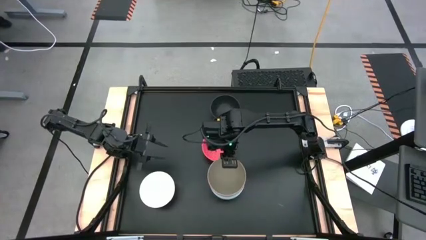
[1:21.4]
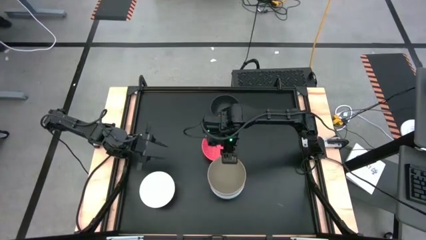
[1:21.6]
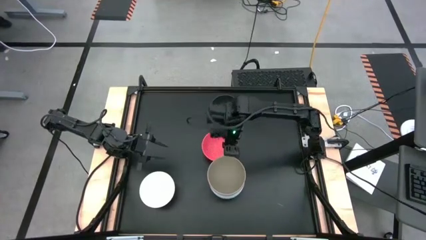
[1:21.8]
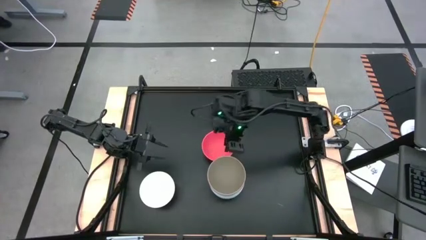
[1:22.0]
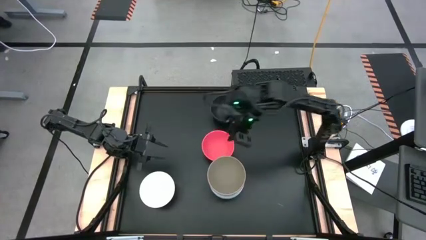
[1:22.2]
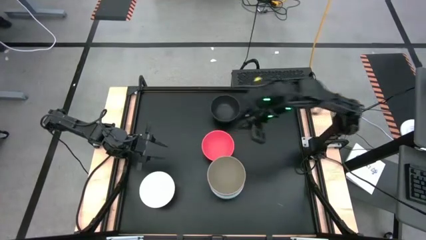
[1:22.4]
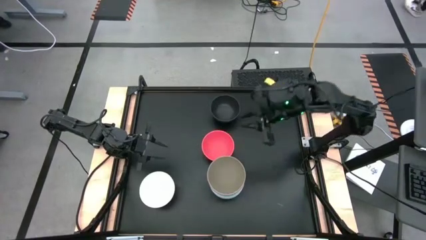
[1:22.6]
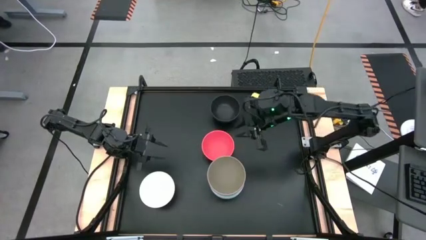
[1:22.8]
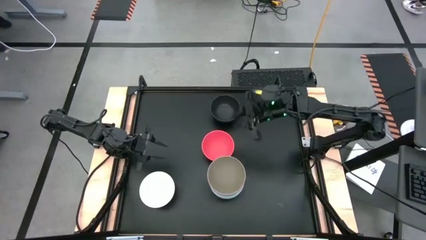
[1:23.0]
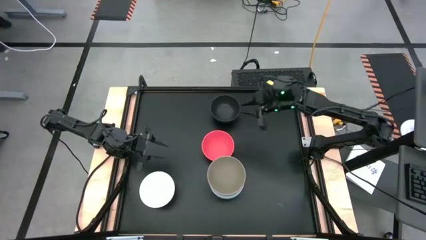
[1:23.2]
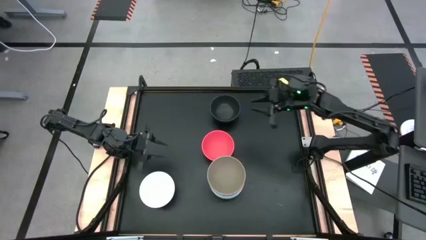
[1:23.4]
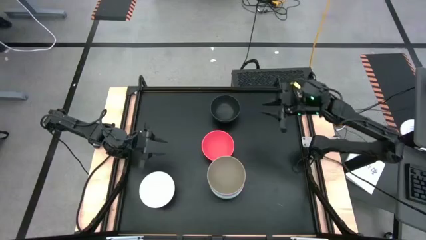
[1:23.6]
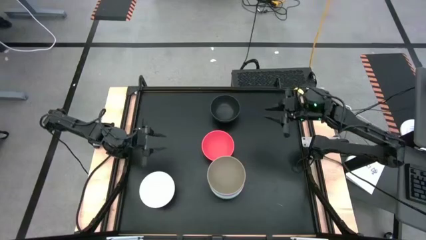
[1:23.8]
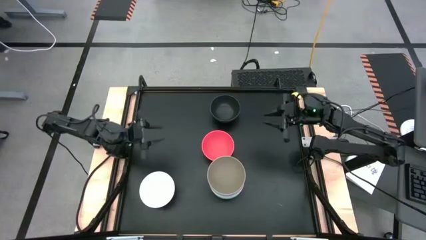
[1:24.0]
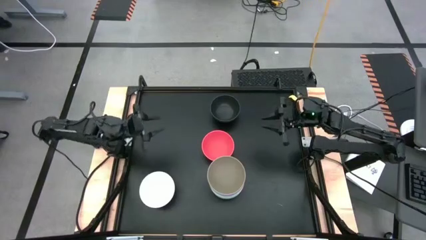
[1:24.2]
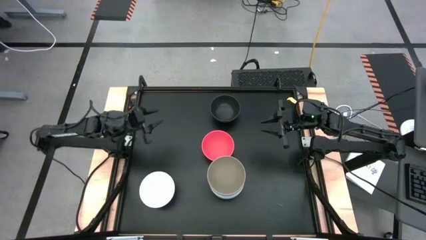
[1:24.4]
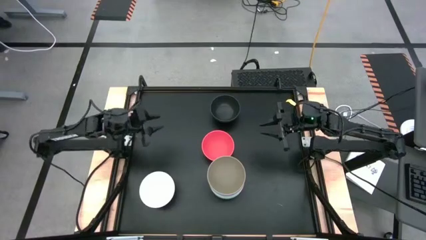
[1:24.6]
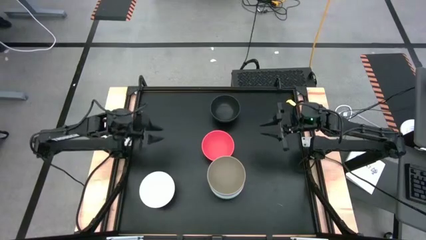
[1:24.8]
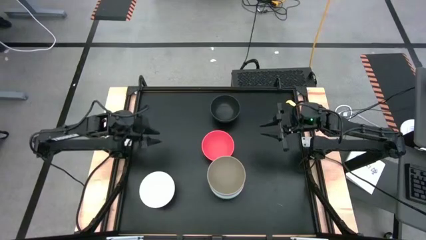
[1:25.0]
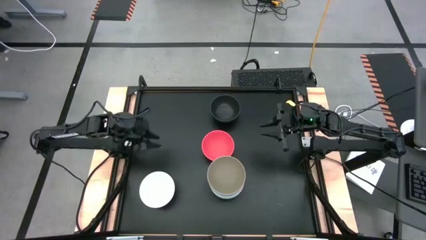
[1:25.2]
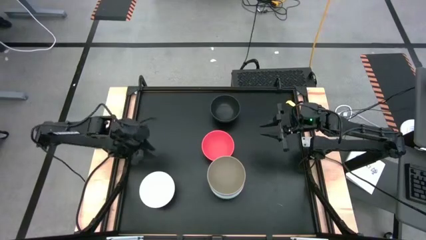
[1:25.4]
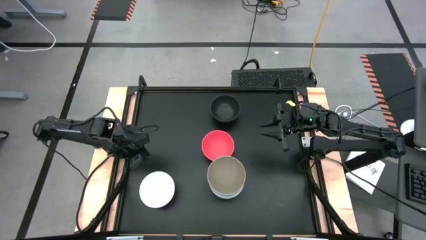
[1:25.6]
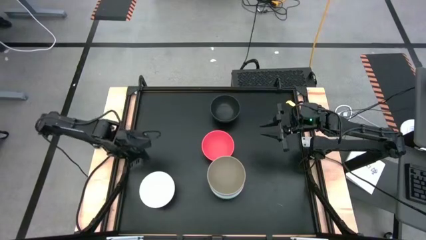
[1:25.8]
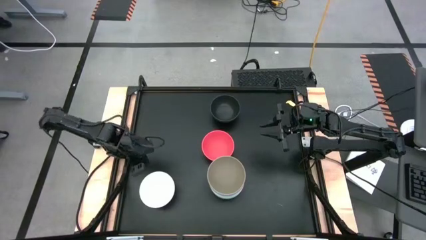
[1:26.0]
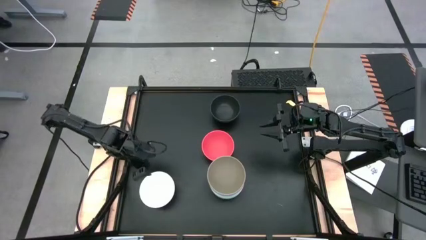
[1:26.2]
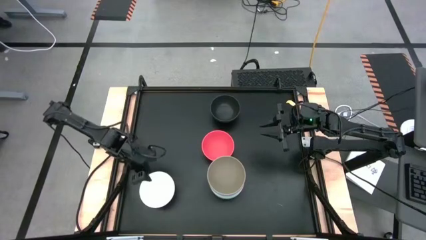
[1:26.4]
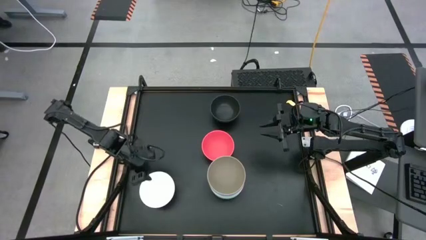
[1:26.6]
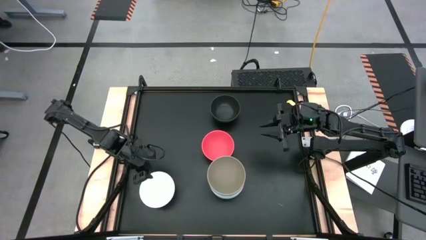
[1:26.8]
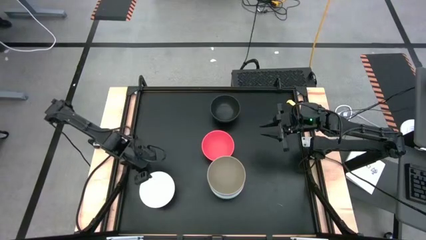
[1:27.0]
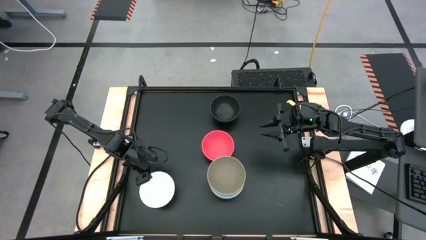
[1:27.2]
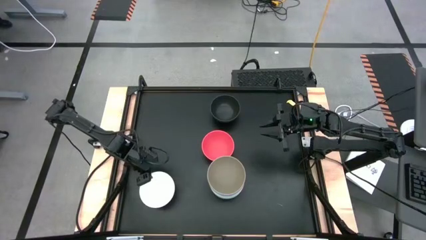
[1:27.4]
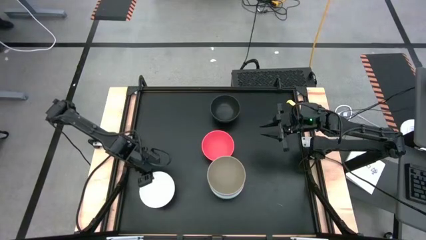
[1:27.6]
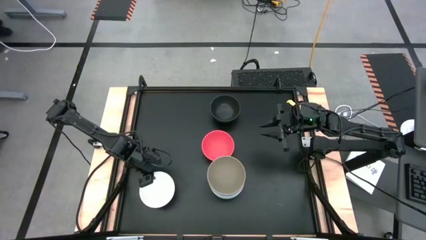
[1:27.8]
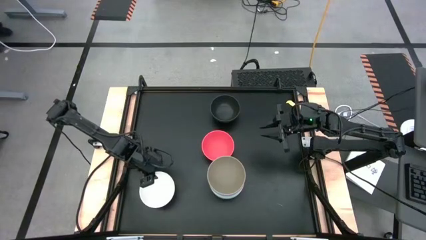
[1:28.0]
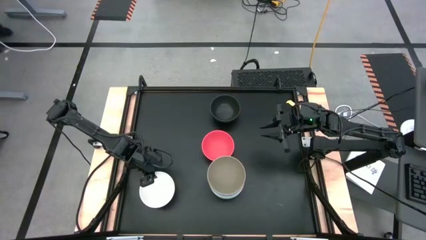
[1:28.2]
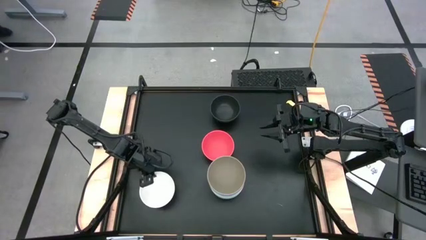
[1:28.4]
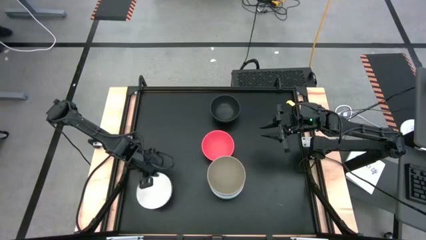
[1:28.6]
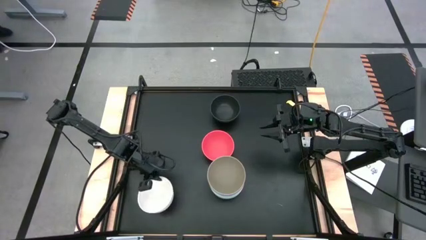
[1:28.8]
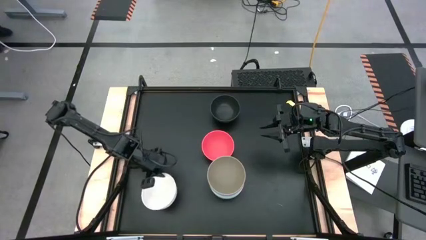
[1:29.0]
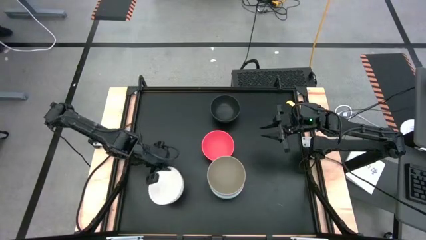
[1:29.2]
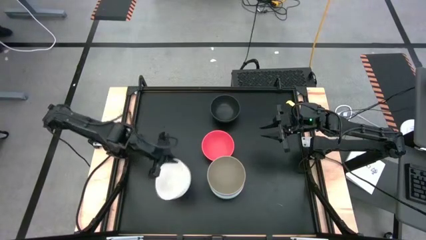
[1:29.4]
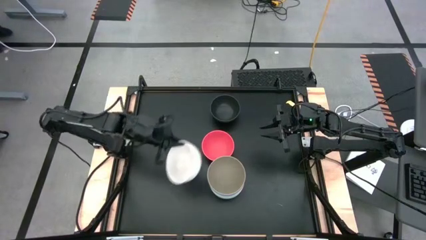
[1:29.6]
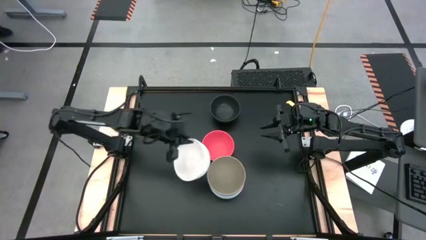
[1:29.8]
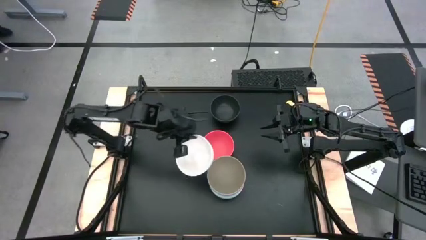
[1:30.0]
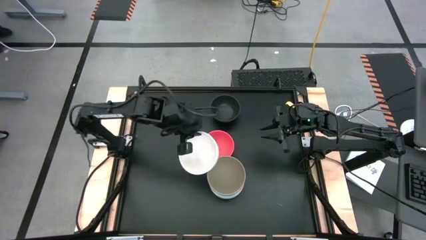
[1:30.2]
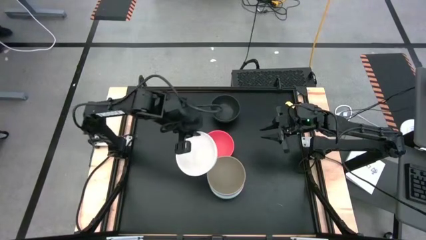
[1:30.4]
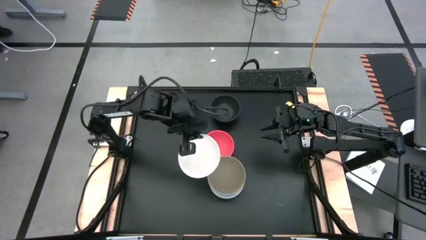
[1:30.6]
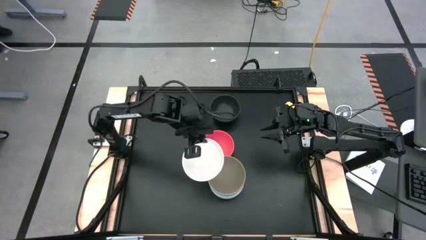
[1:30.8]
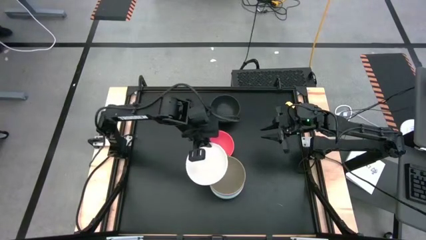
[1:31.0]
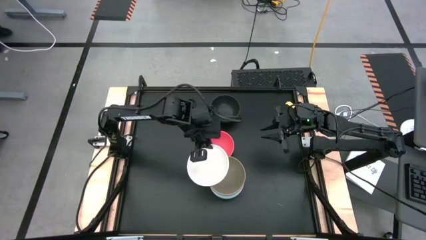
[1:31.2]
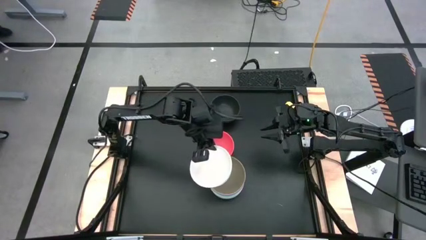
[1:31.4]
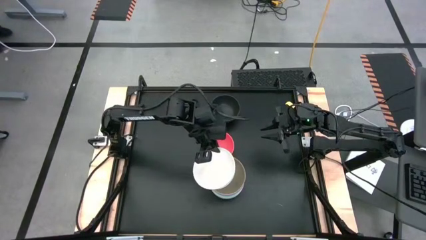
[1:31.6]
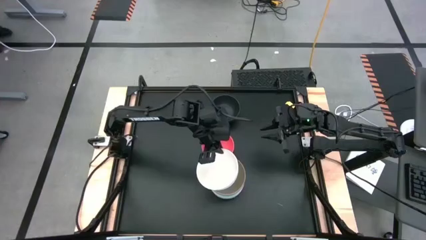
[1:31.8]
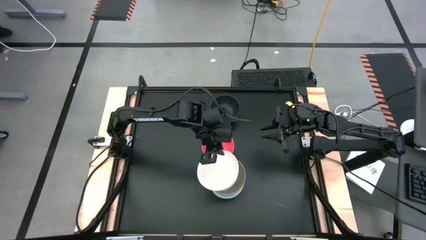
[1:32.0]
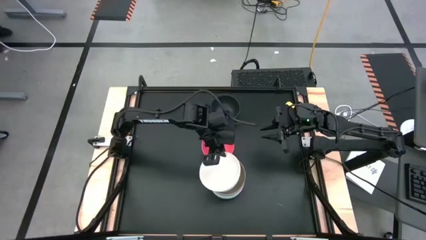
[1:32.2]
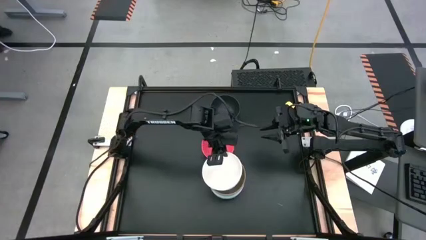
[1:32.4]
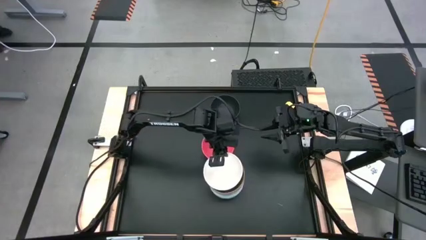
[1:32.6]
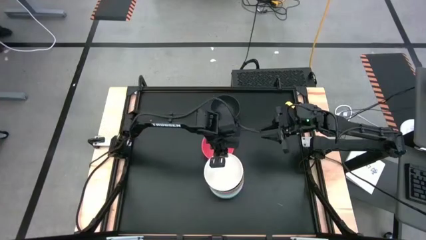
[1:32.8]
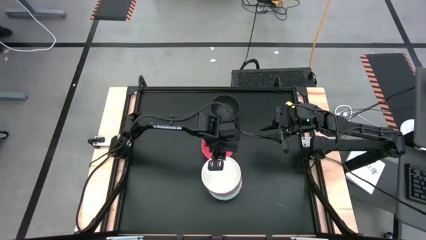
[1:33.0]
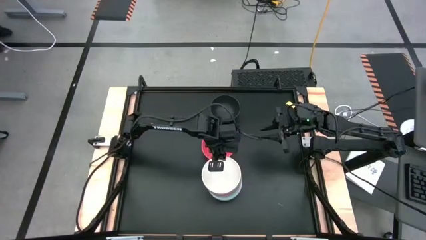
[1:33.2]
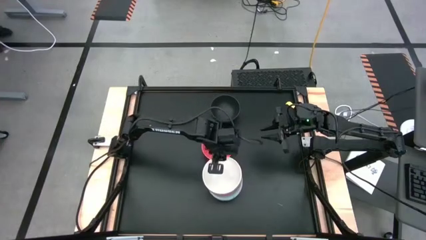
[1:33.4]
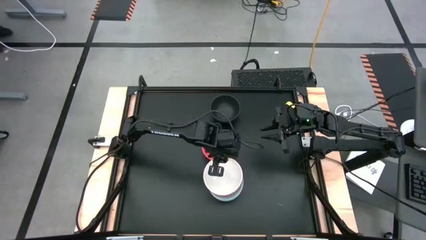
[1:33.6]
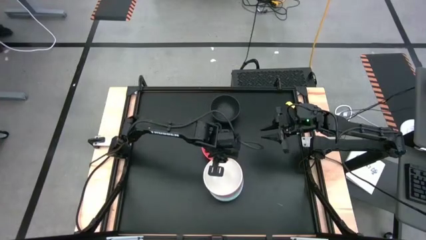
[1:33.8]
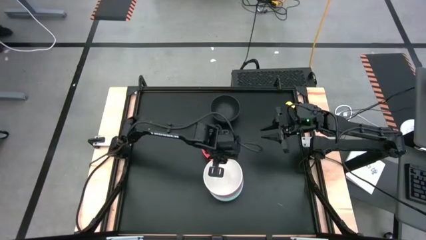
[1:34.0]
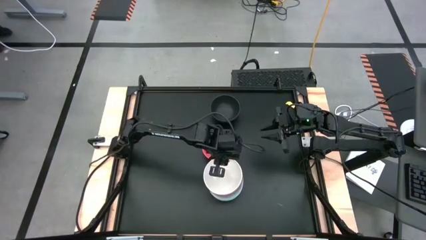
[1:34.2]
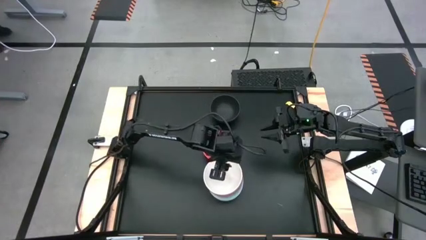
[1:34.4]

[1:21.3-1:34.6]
Task: Nest bowls inside each other
Stack the white bowl on top of the gray bowl
